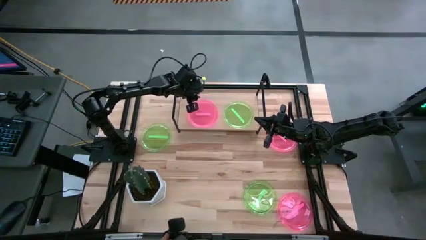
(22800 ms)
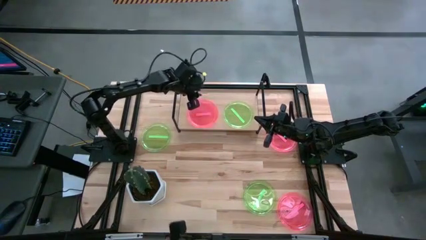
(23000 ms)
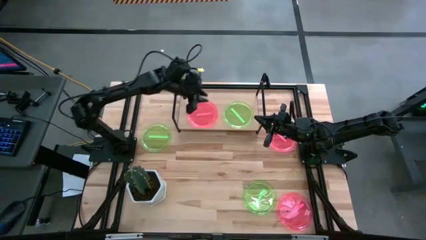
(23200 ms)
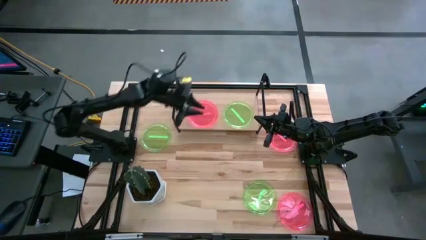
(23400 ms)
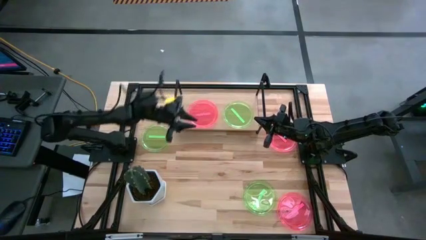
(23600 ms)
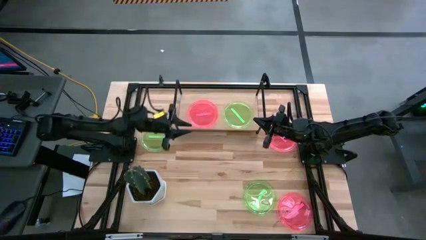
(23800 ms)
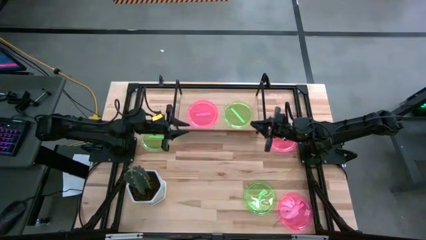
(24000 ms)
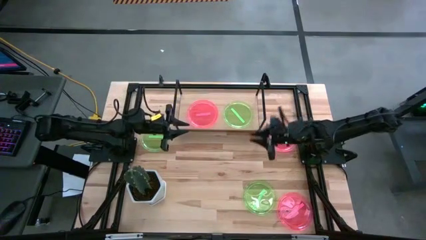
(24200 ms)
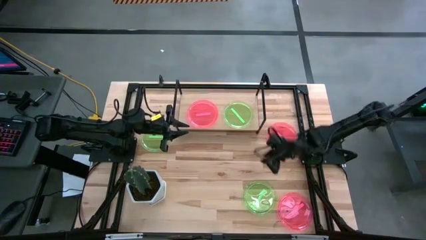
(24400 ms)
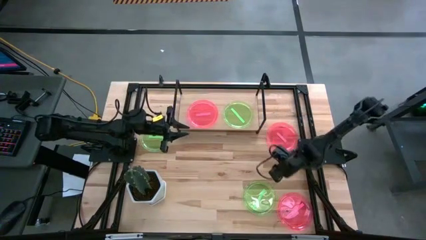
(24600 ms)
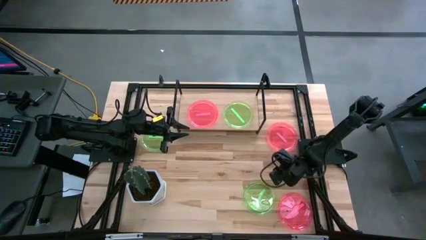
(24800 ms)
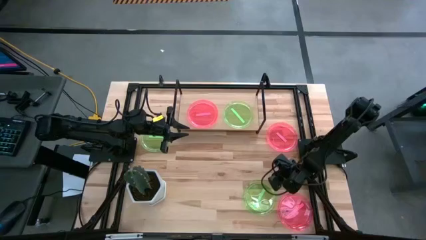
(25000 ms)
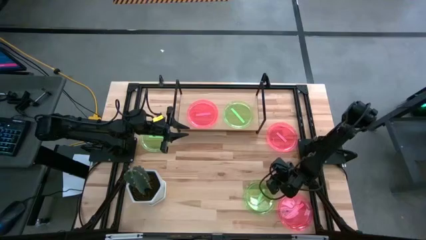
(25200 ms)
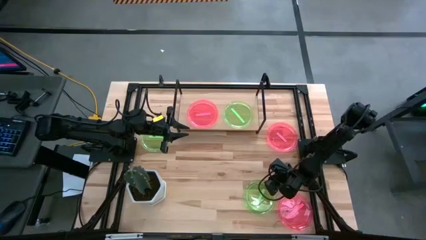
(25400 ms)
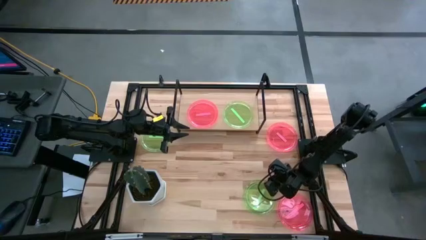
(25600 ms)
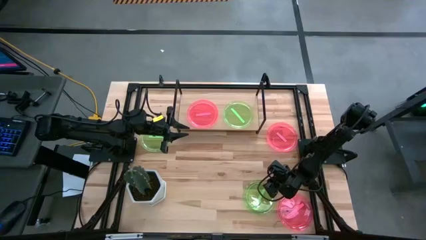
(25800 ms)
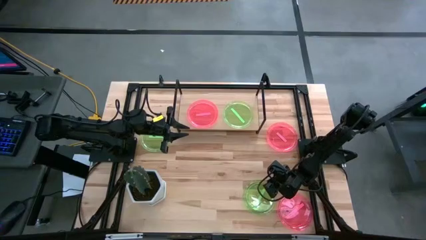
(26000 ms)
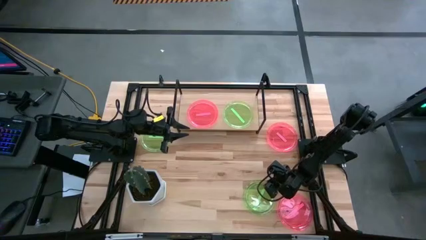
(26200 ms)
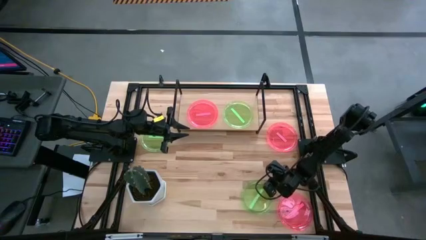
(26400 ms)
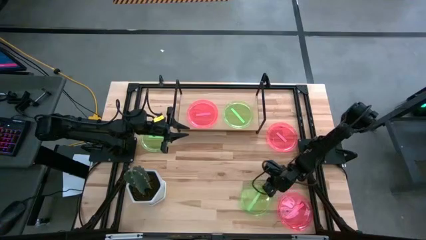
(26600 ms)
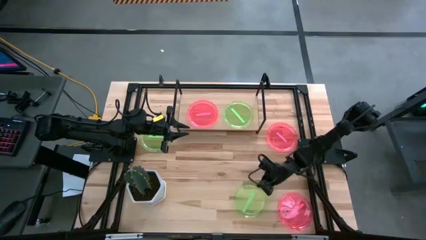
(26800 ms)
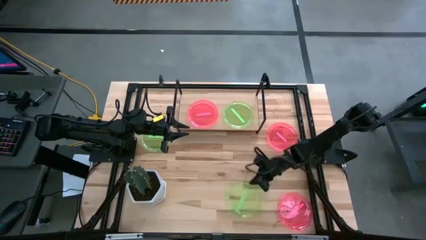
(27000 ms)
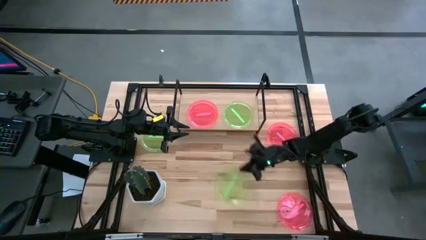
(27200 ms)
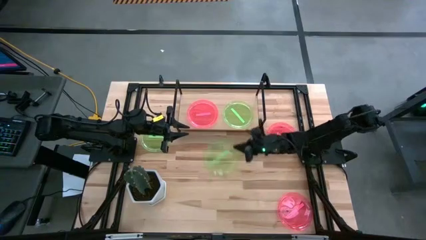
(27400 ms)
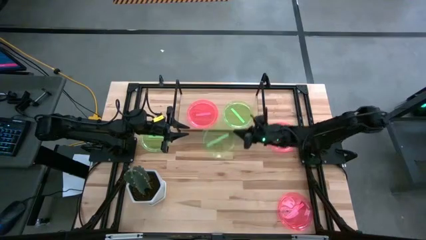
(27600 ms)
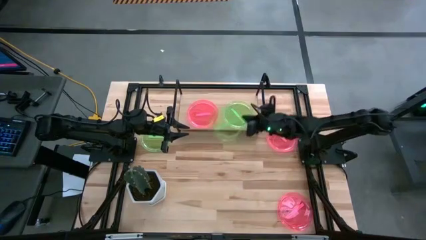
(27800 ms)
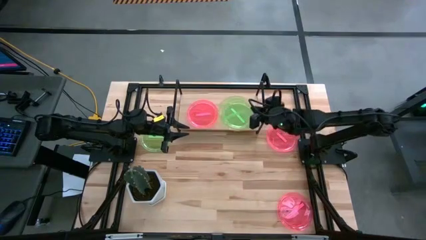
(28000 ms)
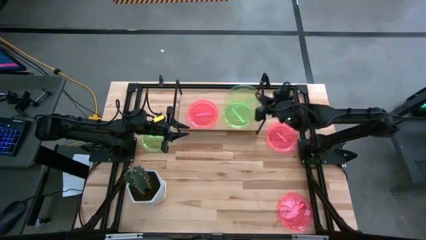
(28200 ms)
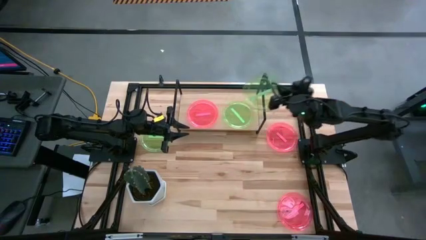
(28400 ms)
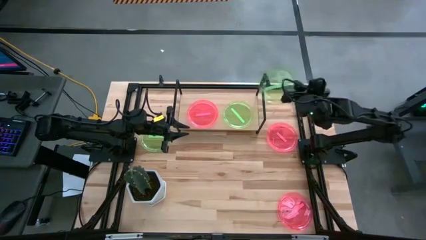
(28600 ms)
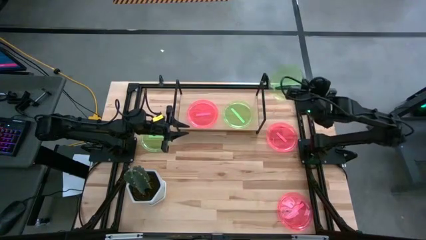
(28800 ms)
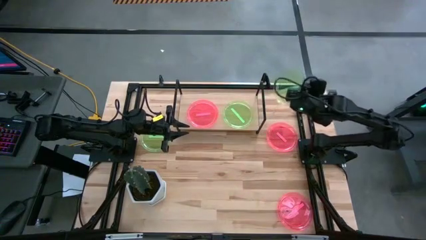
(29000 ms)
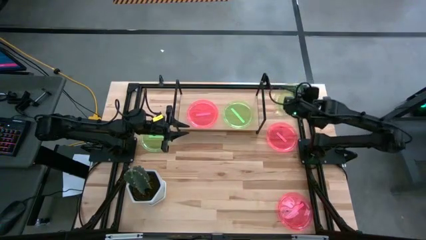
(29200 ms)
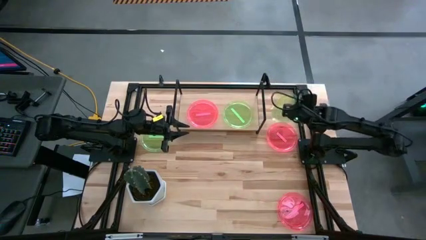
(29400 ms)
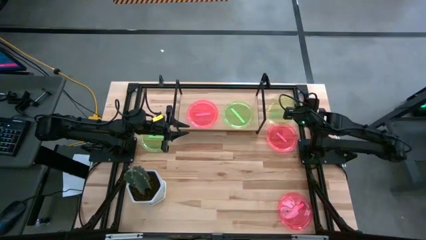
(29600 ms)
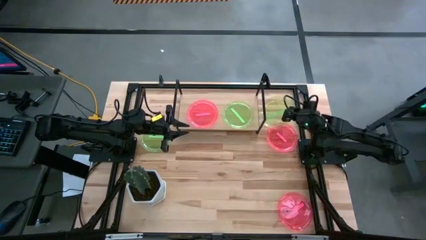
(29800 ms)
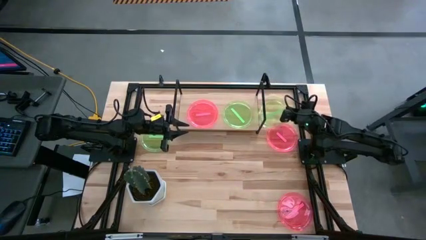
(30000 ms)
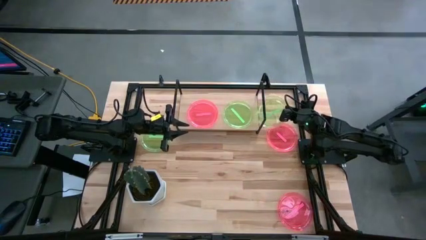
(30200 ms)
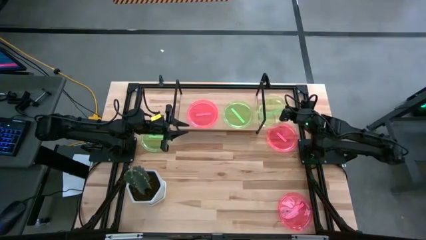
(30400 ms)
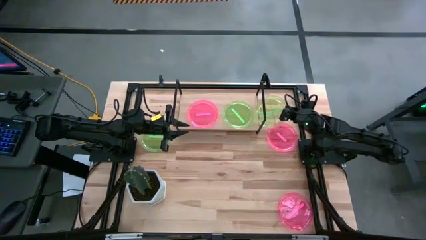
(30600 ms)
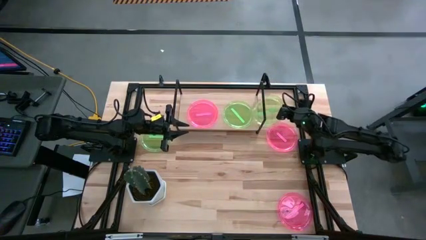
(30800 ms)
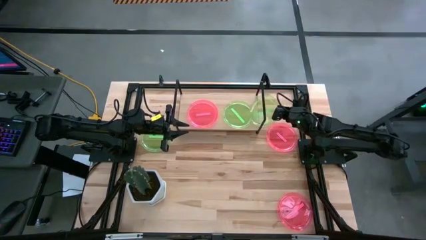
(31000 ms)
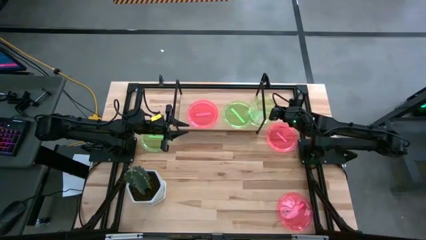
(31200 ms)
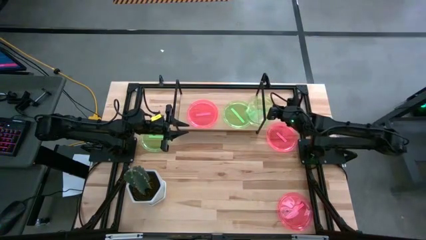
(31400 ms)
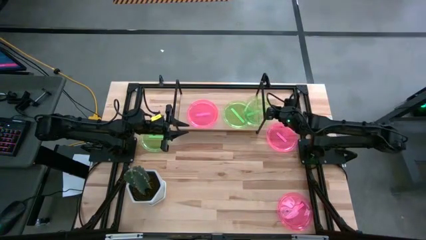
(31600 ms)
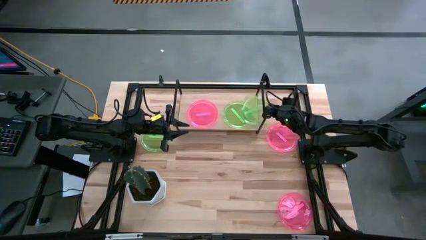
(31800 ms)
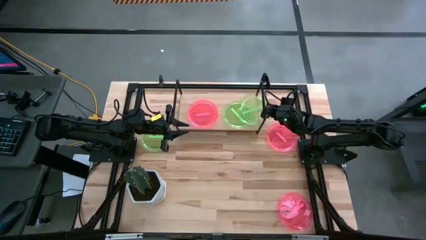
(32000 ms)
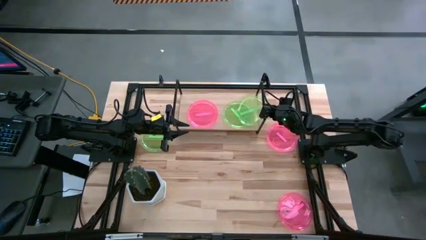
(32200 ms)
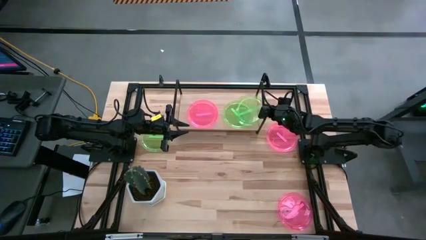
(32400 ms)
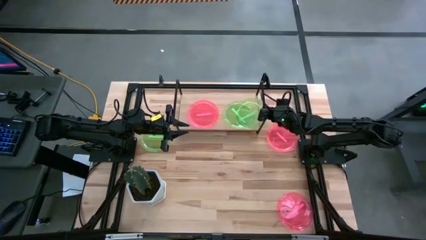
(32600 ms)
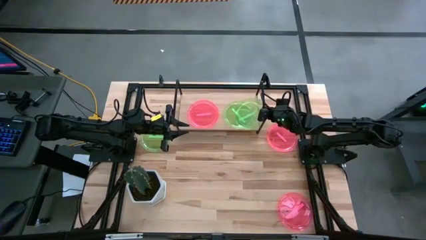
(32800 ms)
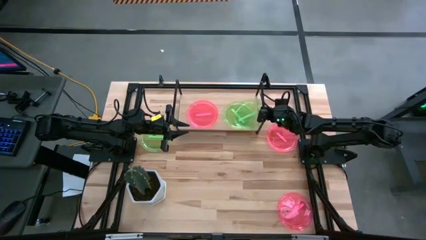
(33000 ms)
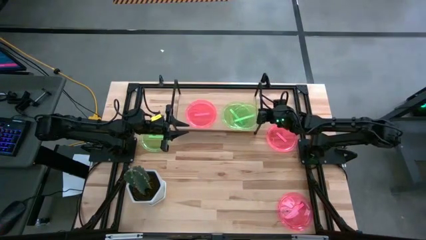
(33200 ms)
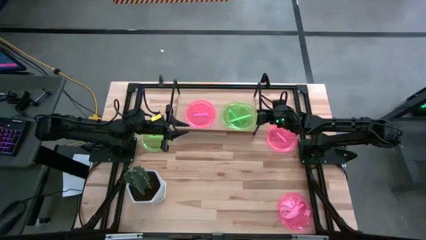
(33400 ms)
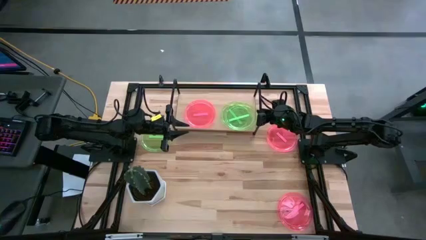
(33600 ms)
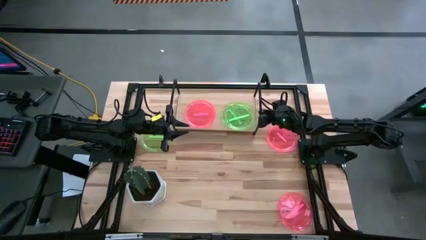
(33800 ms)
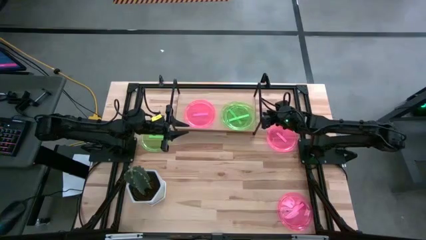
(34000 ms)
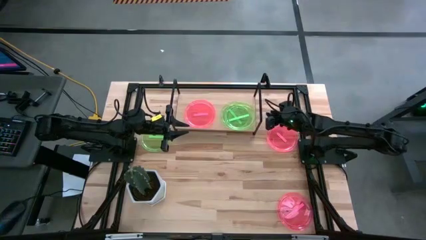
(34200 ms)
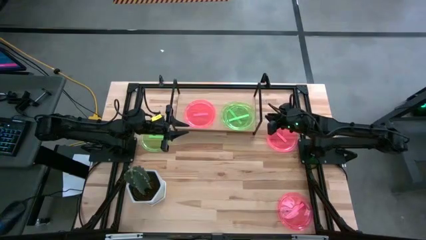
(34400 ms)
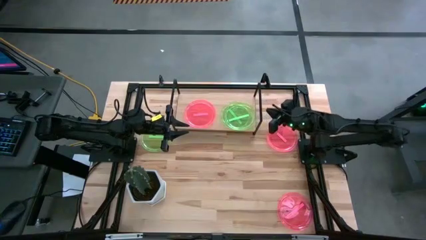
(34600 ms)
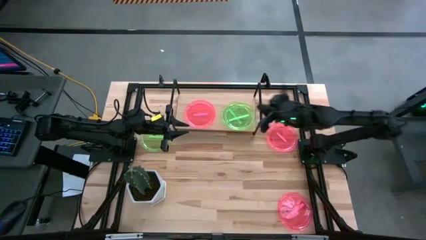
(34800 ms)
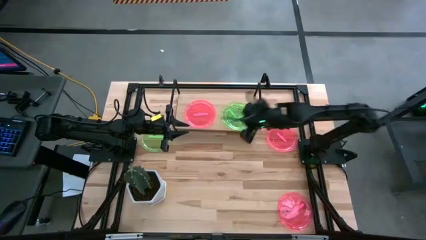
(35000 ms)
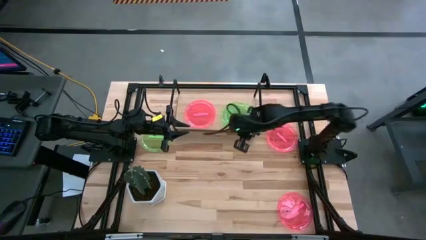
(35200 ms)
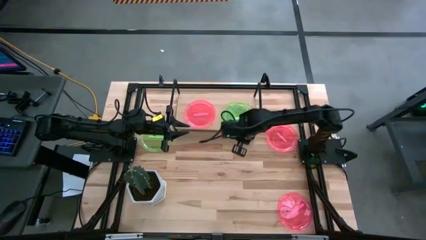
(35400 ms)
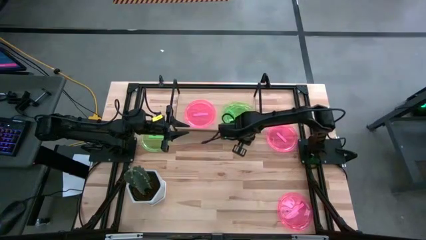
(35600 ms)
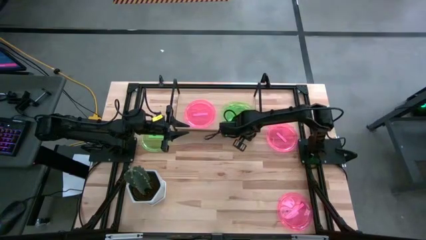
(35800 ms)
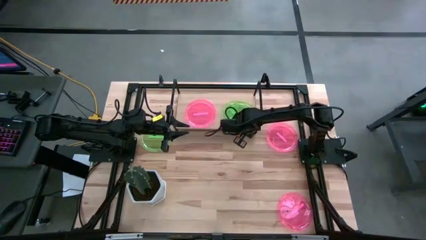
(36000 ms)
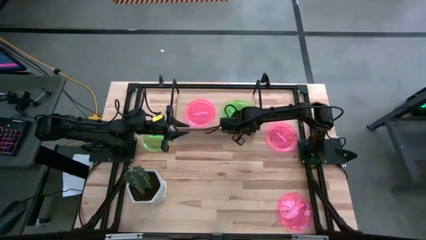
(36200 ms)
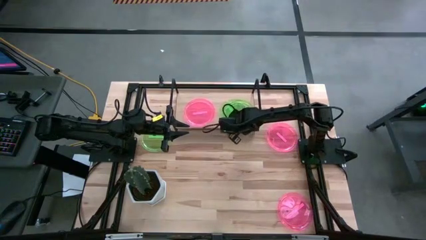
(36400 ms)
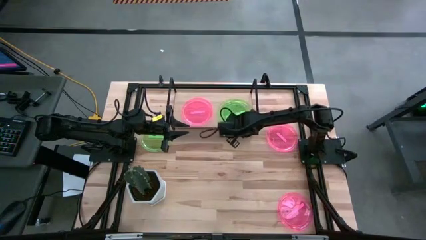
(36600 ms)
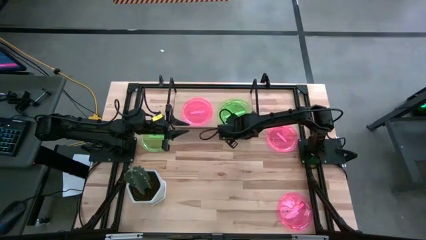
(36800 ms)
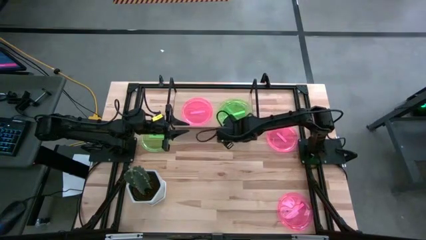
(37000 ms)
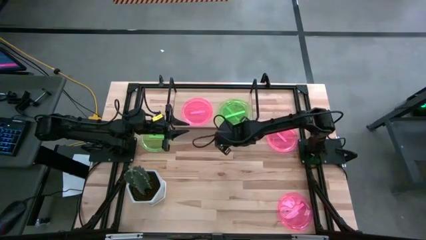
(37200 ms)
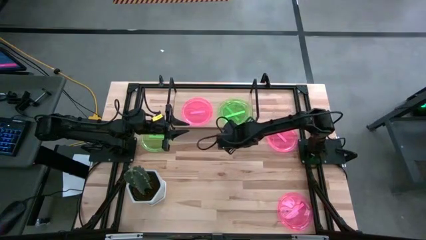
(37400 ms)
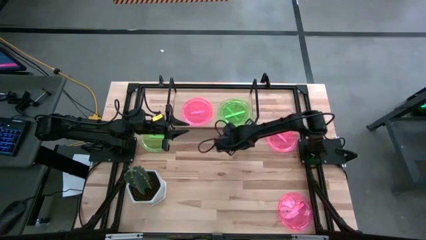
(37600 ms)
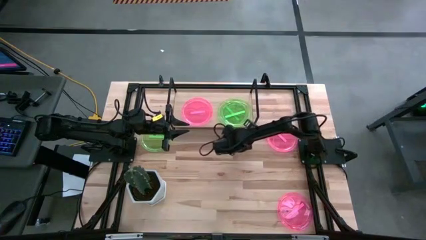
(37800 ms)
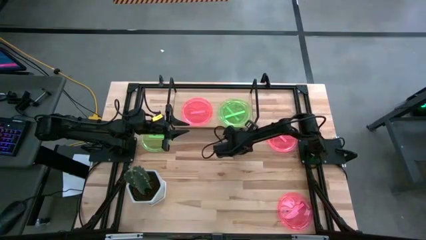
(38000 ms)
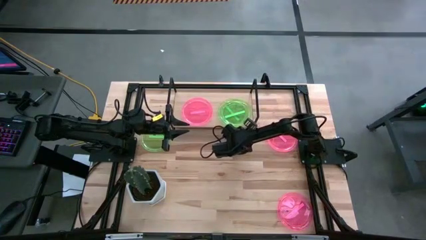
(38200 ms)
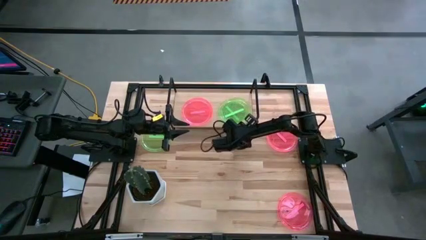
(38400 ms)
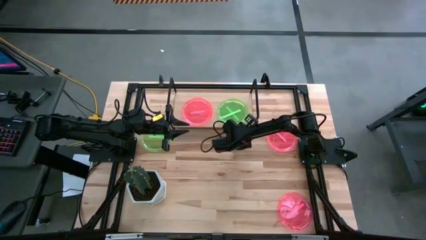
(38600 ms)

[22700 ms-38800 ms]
Task: Place and stack plates onto a shelf
Stack the bottom green plate on top of the other green plate on the shelf
